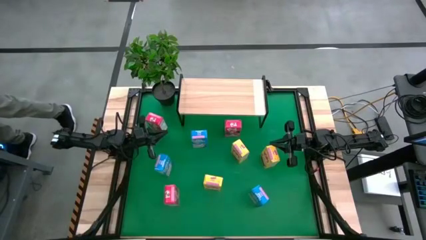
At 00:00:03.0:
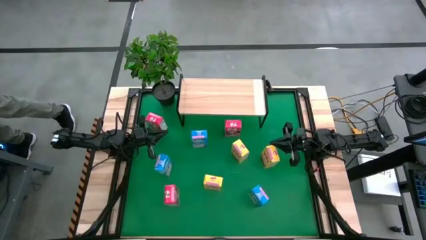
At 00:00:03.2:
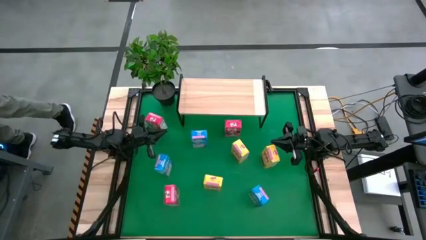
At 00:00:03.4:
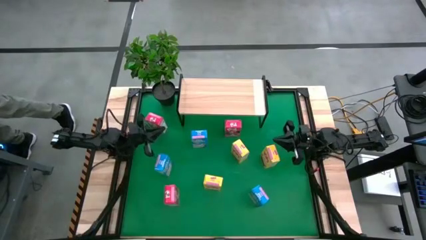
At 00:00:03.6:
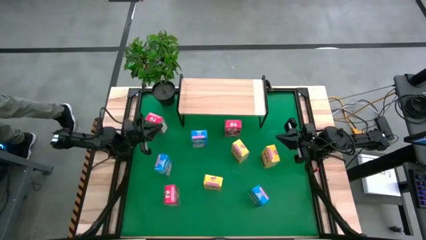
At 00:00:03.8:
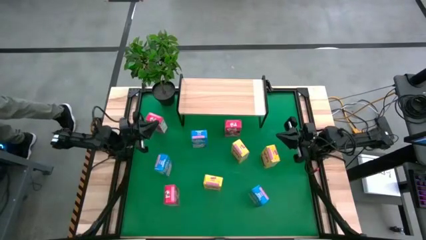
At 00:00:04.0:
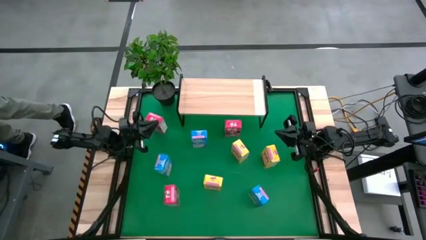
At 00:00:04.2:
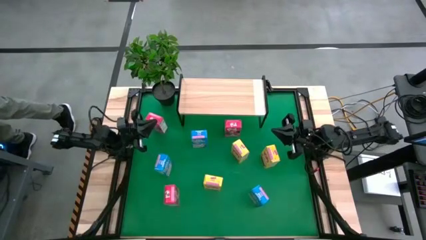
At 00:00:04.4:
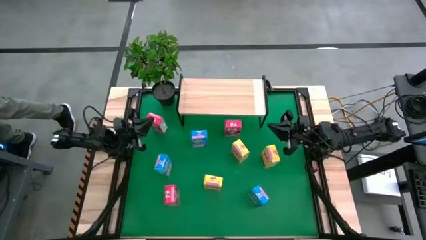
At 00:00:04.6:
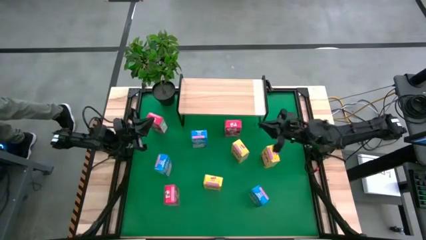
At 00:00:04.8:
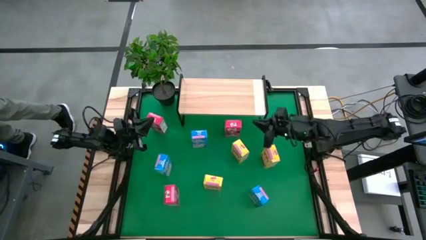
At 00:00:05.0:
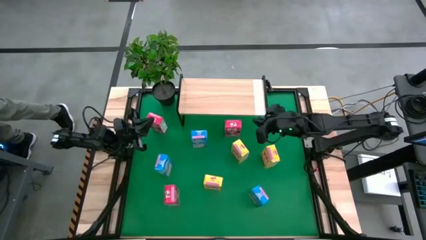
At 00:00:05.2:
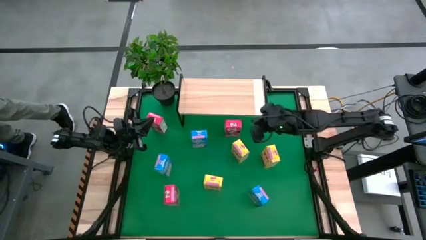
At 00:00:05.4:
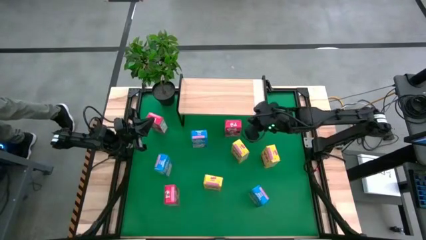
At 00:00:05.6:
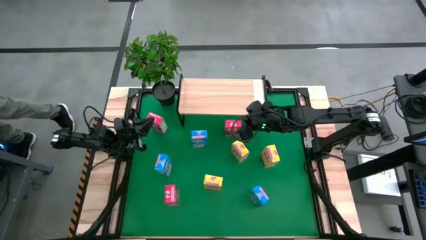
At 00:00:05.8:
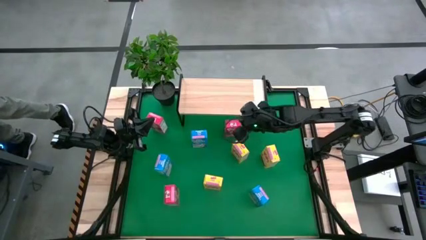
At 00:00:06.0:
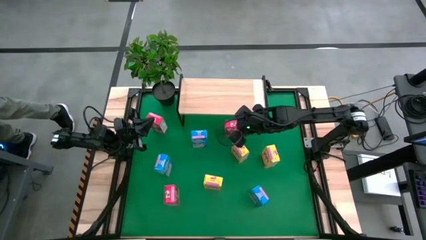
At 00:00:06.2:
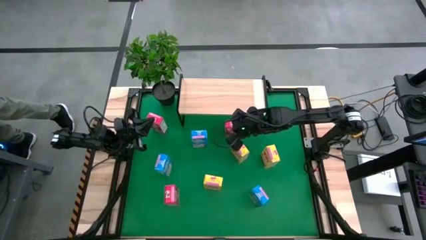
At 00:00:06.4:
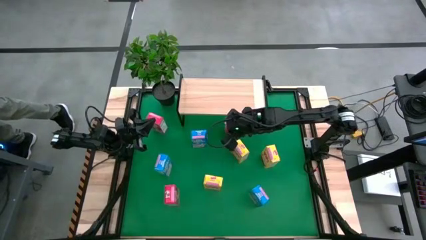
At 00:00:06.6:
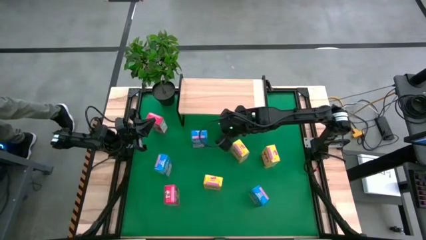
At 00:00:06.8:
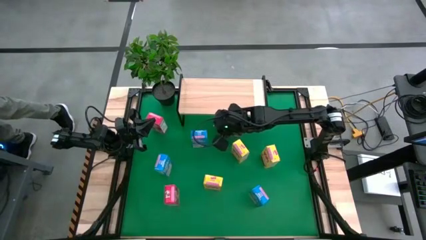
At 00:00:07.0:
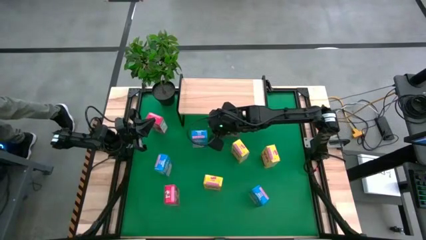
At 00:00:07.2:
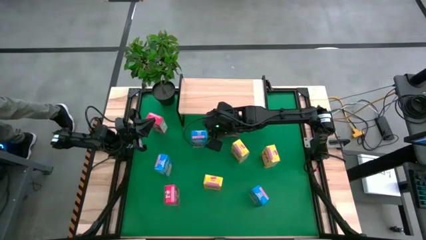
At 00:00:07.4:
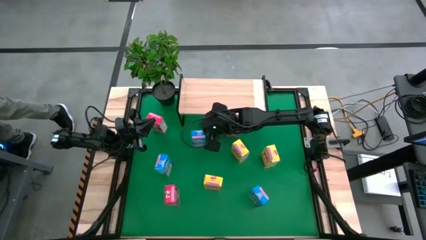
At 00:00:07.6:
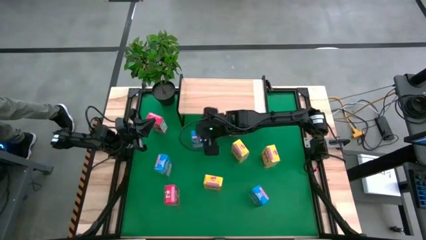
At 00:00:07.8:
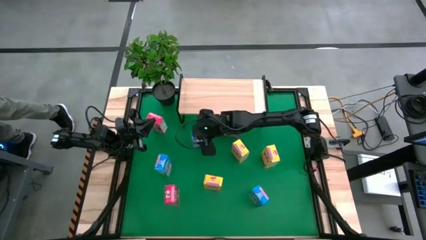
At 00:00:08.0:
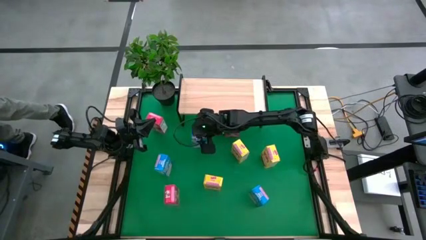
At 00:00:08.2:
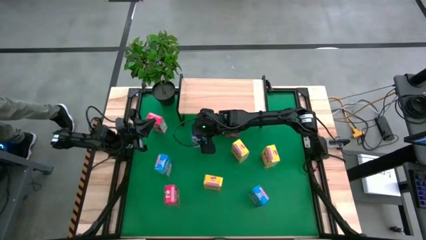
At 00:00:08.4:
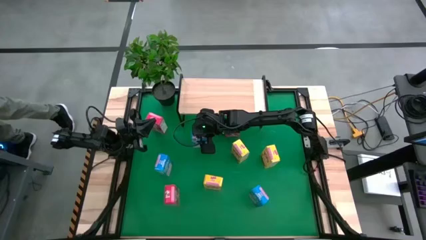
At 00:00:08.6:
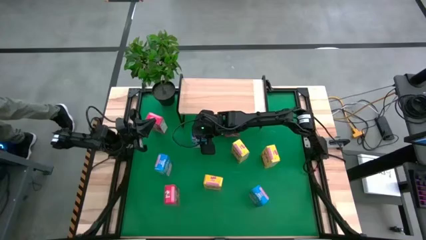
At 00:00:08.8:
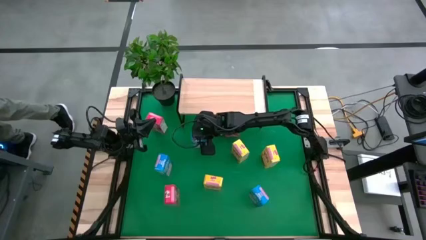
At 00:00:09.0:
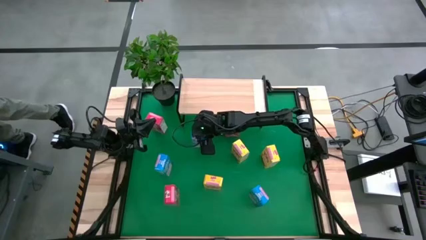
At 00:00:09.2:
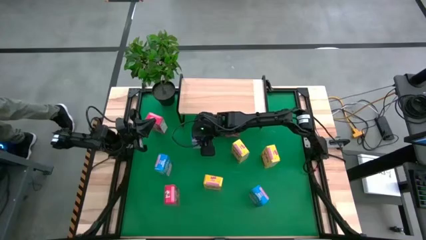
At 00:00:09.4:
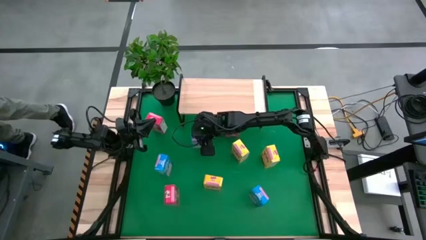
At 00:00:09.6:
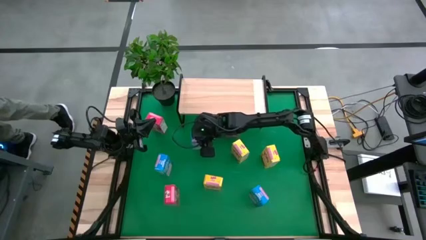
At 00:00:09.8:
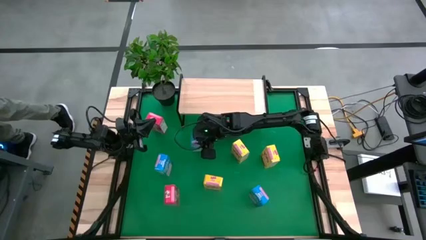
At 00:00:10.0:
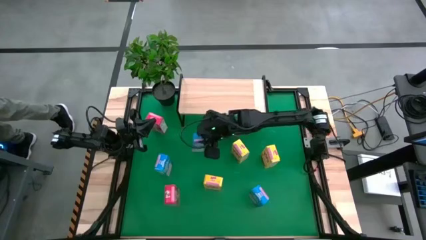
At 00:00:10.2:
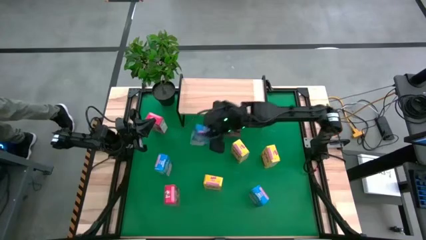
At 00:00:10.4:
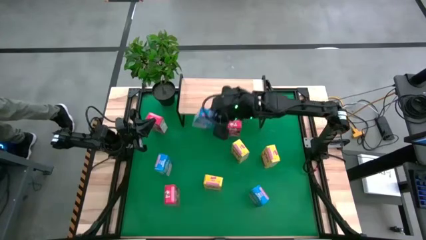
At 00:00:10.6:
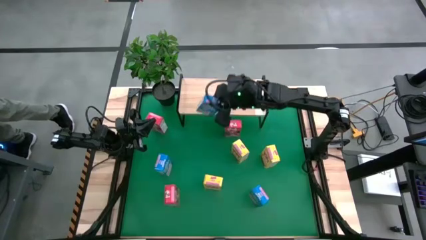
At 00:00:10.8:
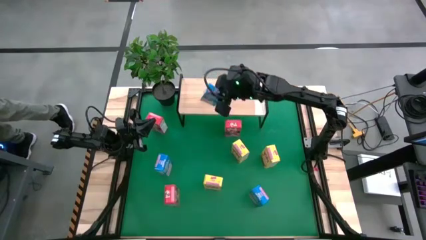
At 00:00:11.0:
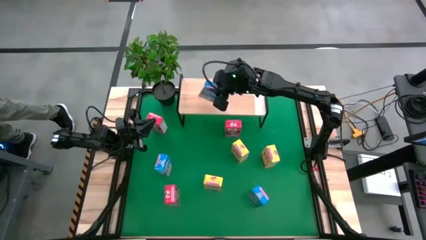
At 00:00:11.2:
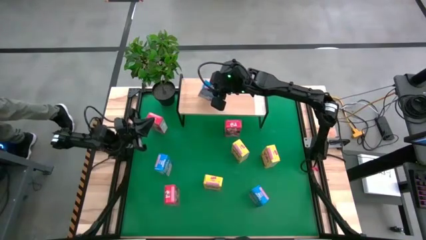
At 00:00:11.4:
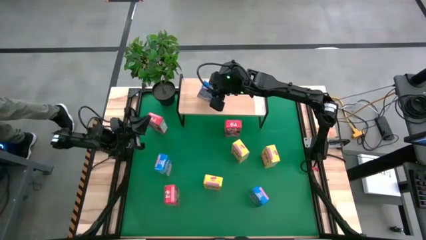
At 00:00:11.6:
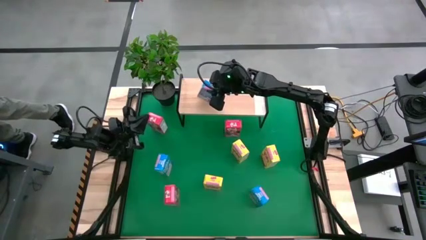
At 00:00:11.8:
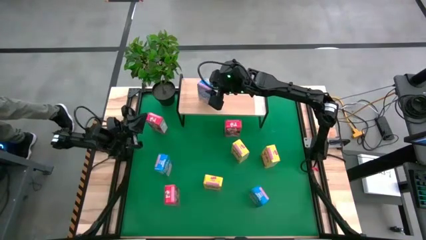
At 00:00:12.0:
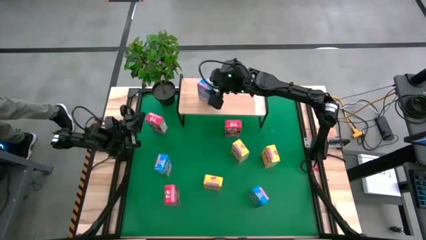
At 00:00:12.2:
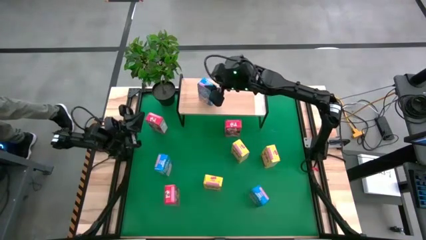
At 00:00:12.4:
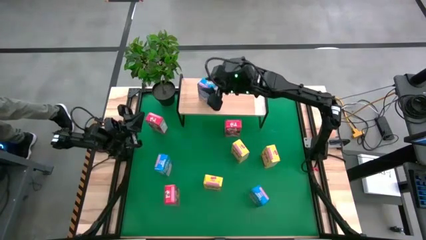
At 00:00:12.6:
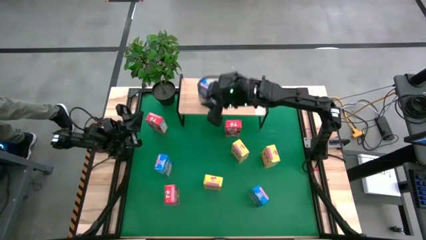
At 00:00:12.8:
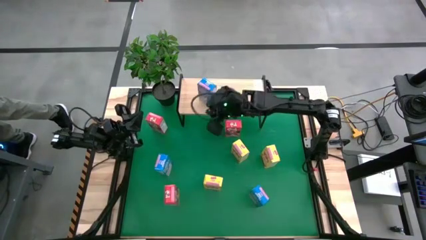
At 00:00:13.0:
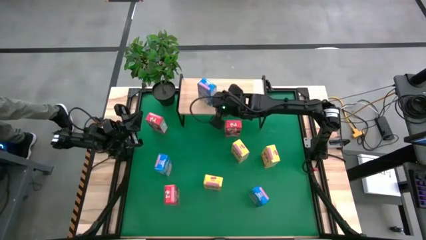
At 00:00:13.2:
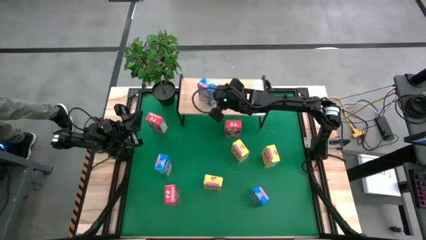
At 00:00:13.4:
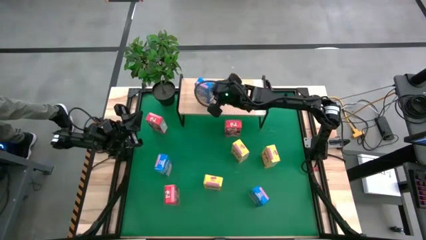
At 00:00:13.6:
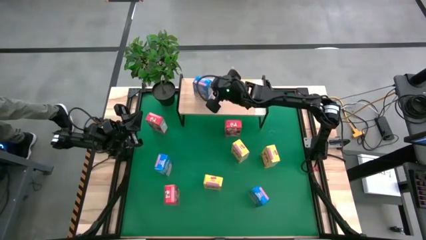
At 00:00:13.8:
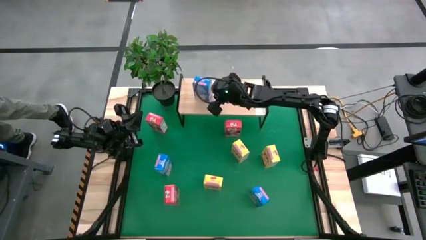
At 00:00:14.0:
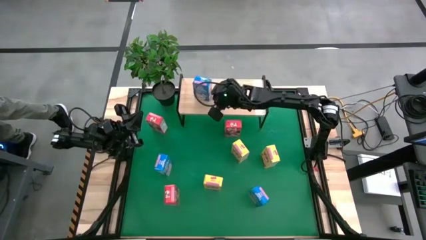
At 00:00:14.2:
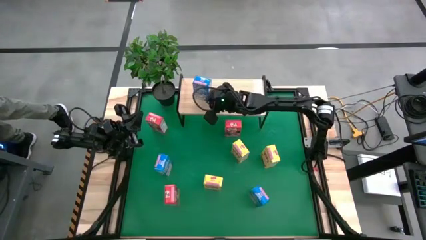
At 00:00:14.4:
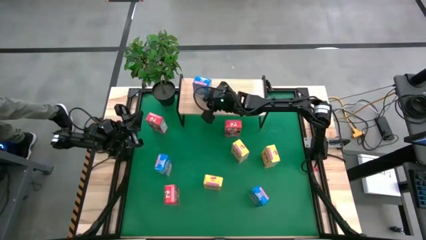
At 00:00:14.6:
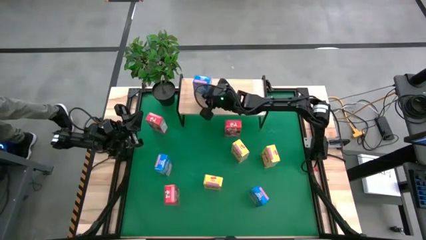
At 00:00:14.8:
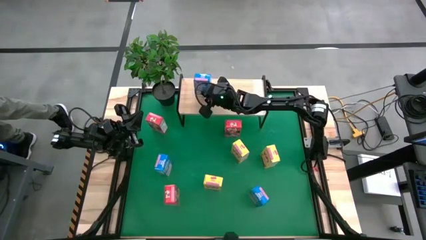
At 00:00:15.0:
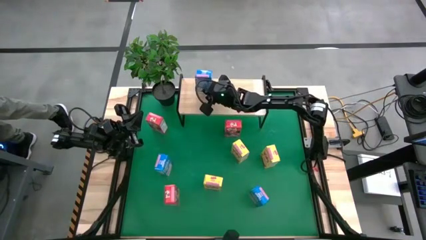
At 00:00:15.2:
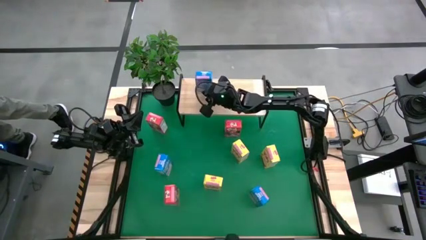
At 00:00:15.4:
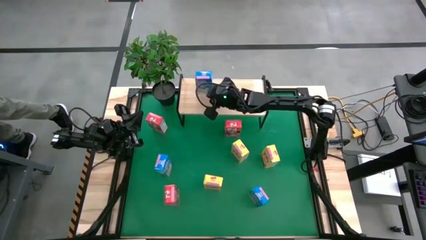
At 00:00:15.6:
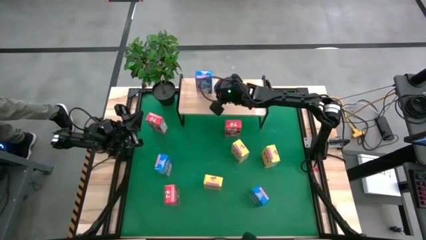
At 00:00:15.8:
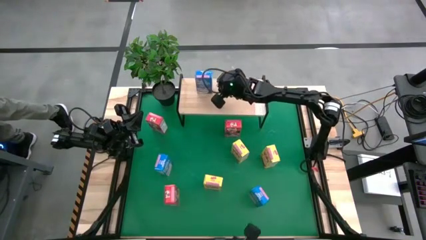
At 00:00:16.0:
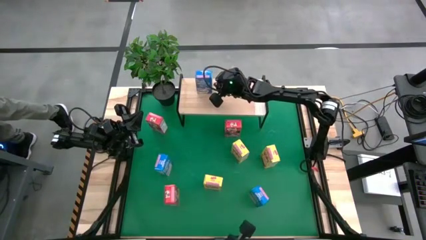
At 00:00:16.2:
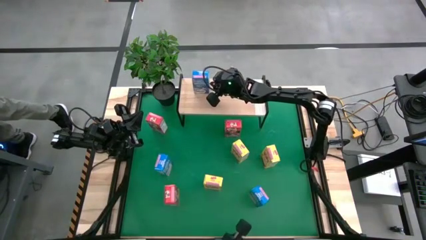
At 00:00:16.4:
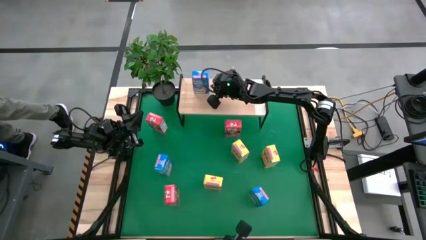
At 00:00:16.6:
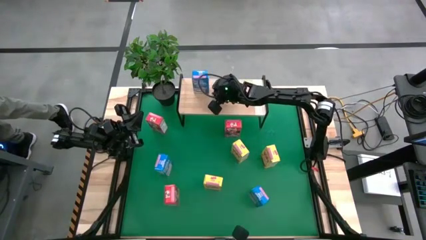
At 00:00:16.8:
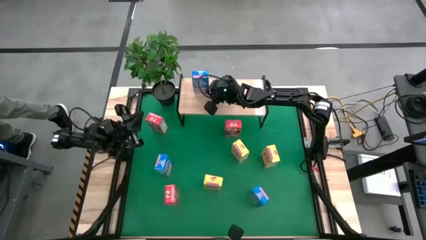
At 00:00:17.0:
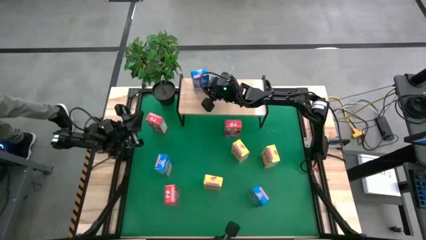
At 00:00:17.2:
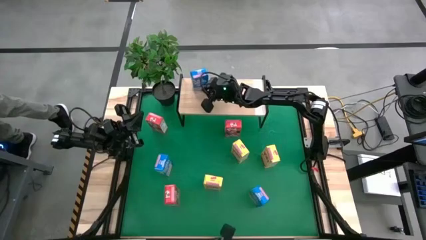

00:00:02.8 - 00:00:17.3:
Task: Stack cereal on shelf
Put the middle blue cereal box on the shelf
